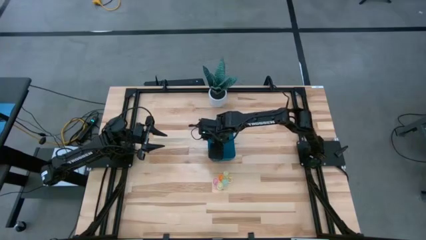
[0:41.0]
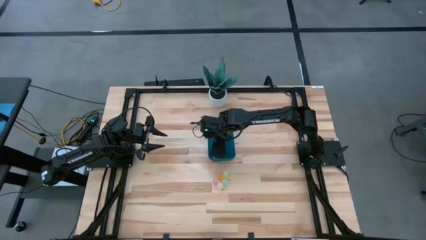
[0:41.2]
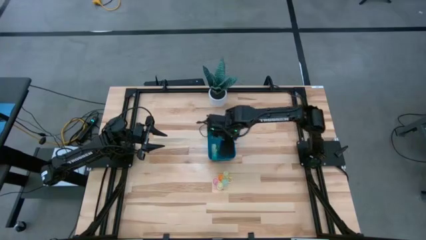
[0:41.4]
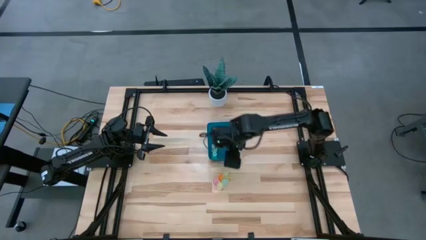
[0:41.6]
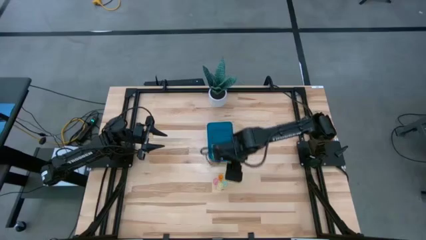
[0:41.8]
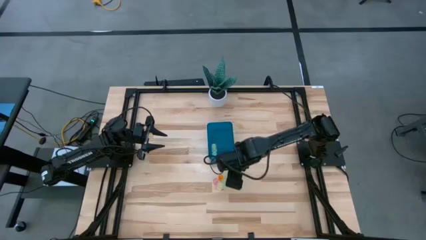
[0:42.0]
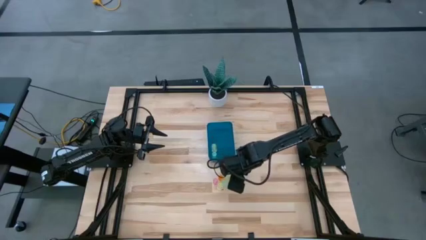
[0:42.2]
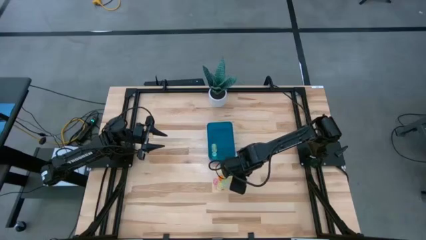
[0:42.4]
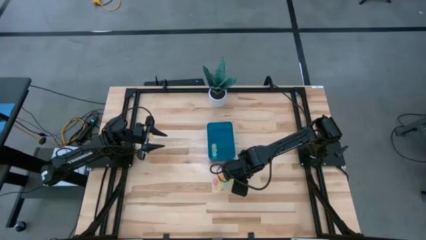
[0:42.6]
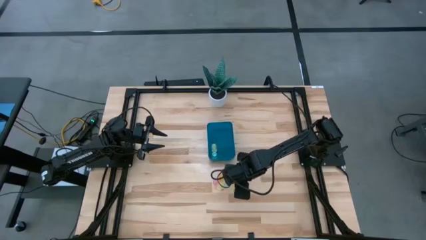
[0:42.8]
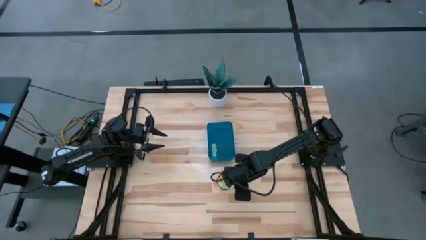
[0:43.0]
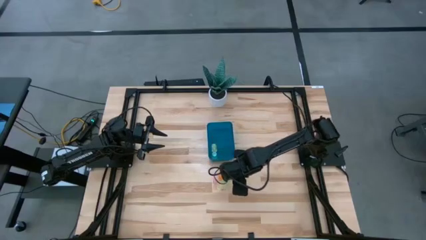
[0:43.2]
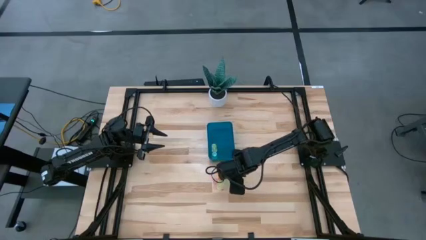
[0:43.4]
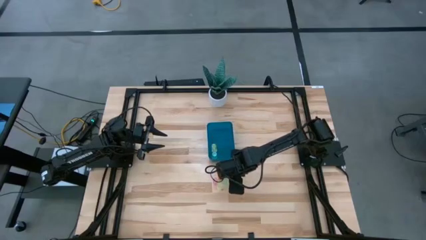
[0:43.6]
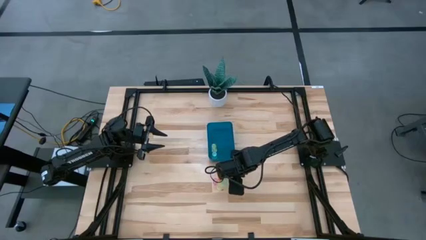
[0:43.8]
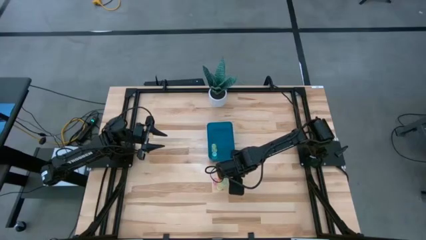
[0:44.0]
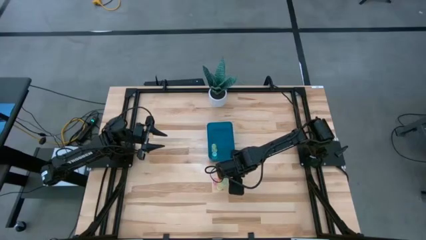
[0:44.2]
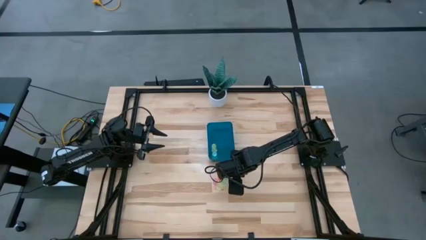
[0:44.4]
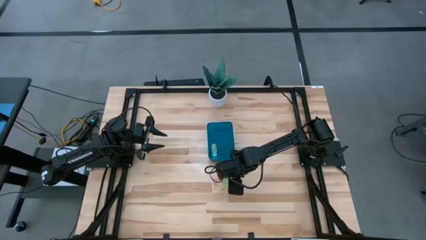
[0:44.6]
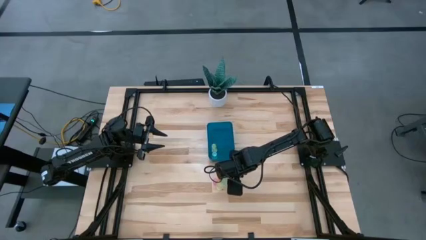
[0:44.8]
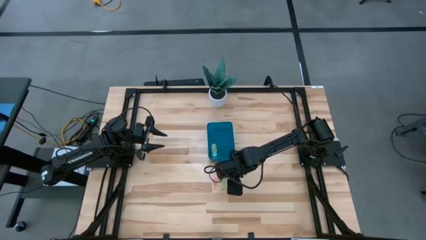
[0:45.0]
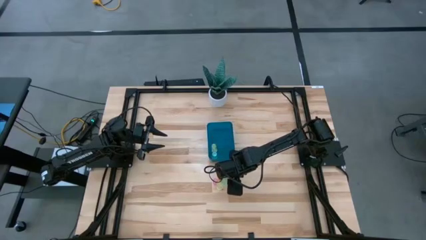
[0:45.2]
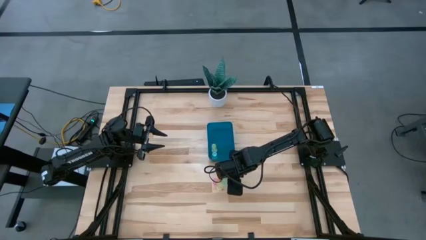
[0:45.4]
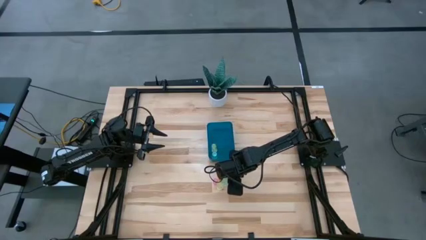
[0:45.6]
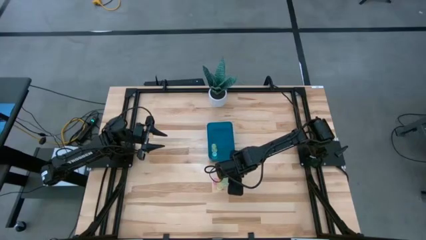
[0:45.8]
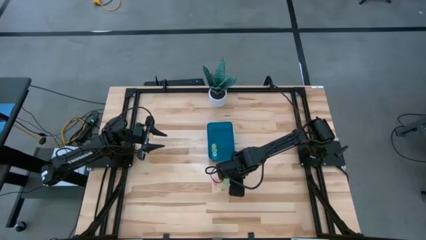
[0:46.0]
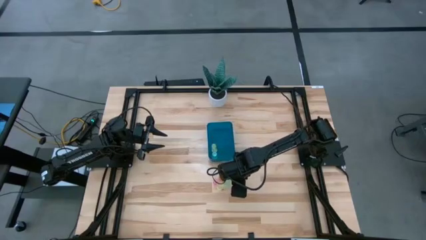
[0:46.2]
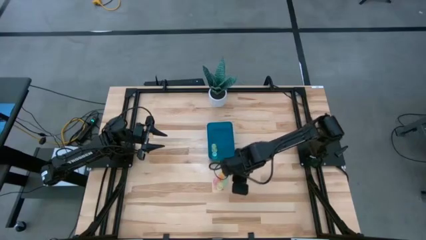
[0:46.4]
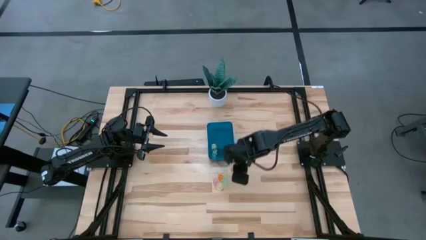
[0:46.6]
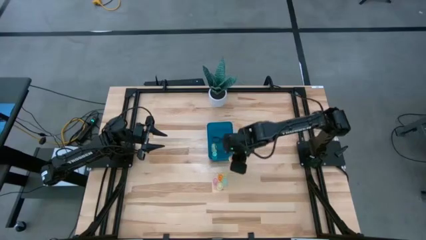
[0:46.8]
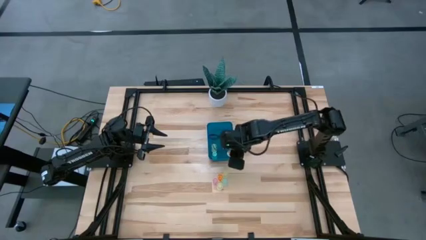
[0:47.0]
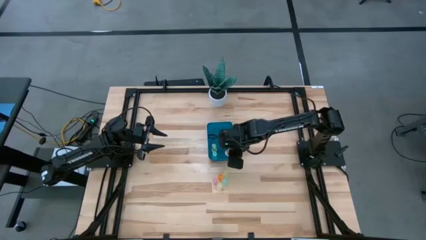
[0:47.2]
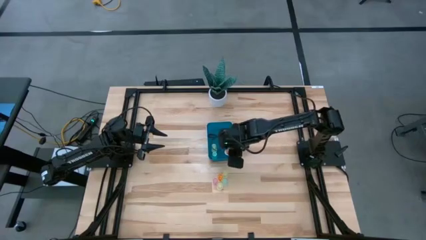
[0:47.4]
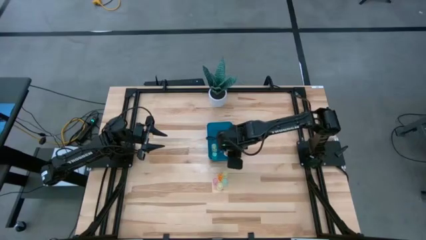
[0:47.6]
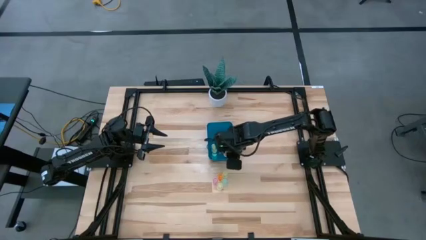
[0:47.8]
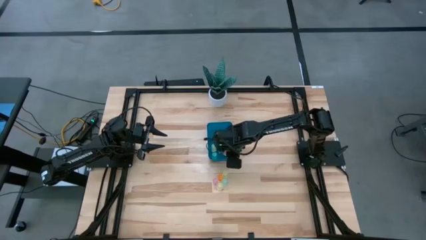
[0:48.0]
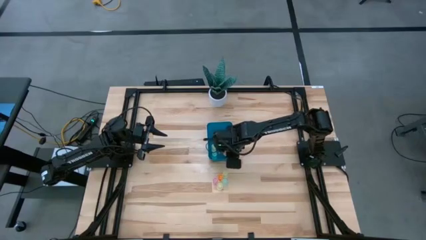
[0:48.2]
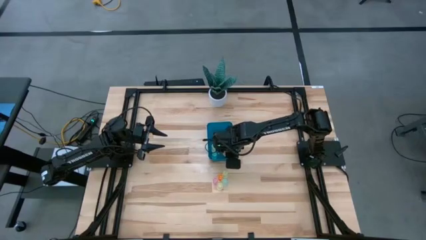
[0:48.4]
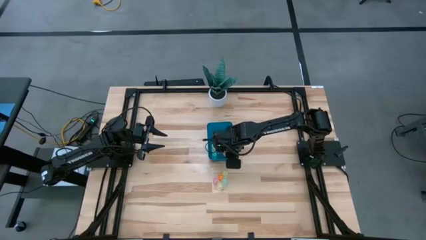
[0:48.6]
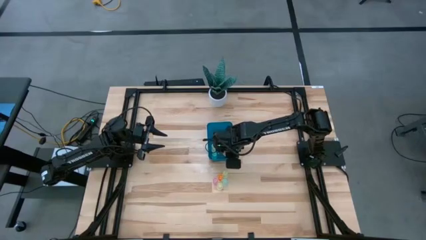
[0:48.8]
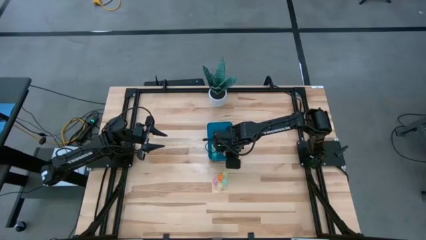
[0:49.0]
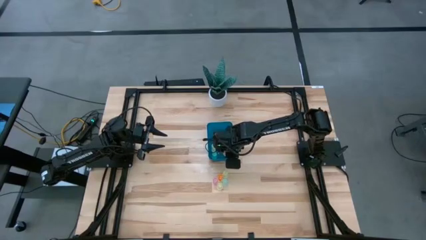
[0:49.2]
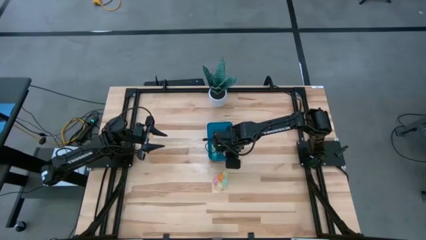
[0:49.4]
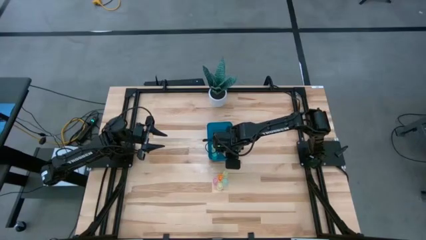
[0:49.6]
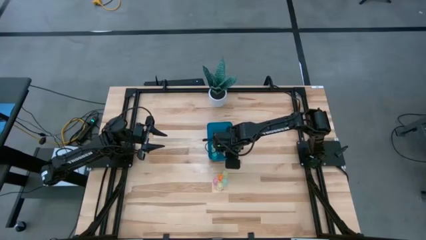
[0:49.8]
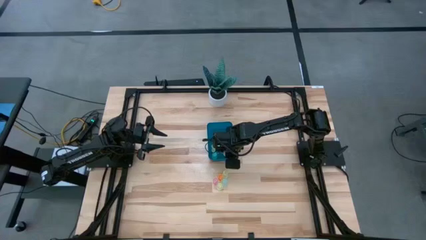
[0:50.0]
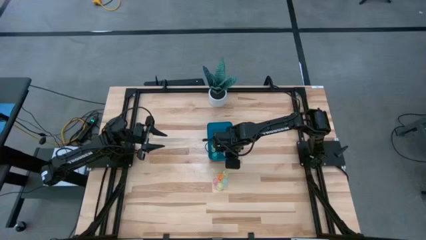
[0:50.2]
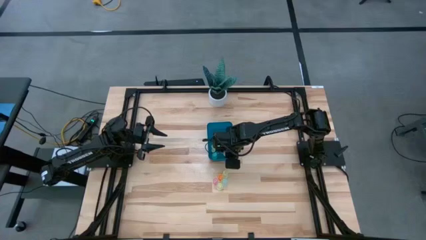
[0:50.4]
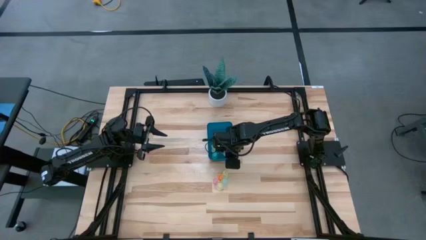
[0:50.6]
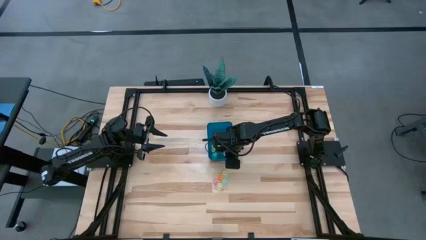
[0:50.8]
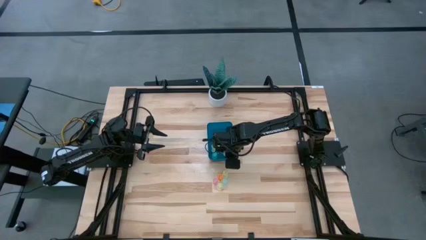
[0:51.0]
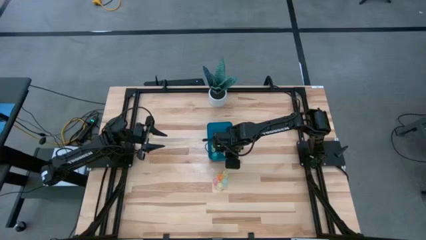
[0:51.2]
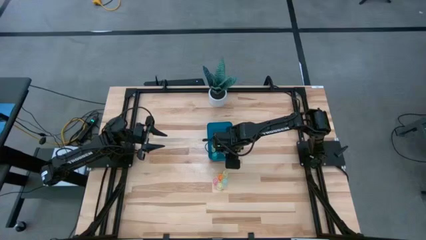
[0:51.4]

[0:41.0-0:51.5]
Task: Pick and place pill bottles into a basket
Put the yellow pill bottle into the blue container
